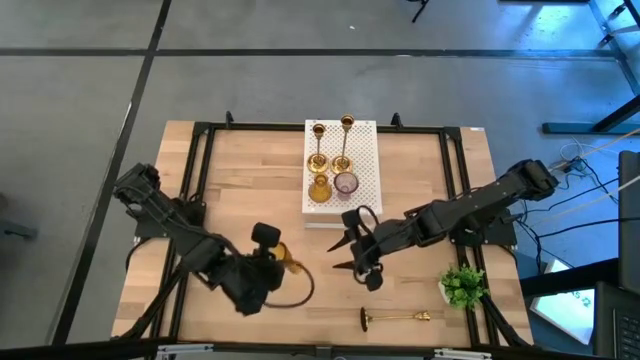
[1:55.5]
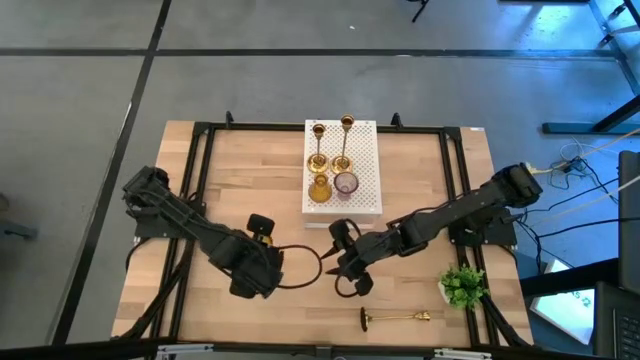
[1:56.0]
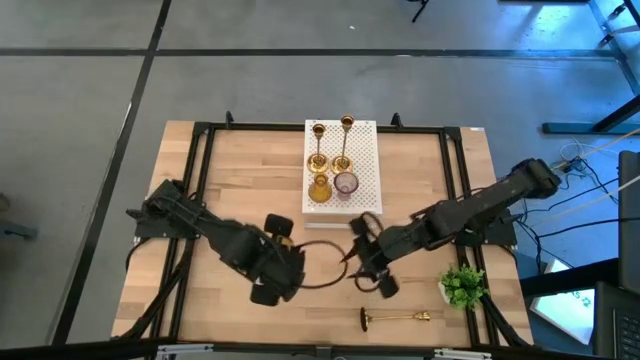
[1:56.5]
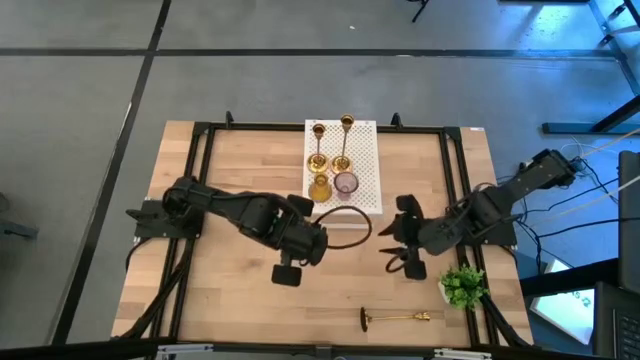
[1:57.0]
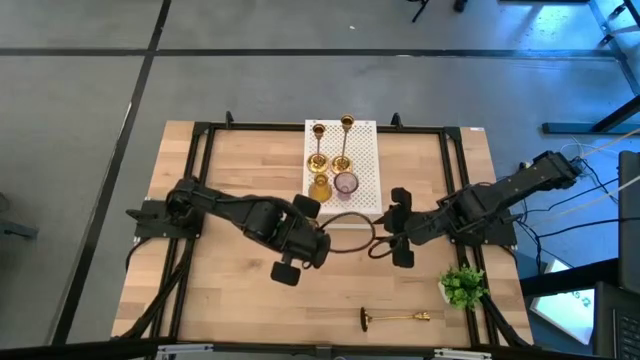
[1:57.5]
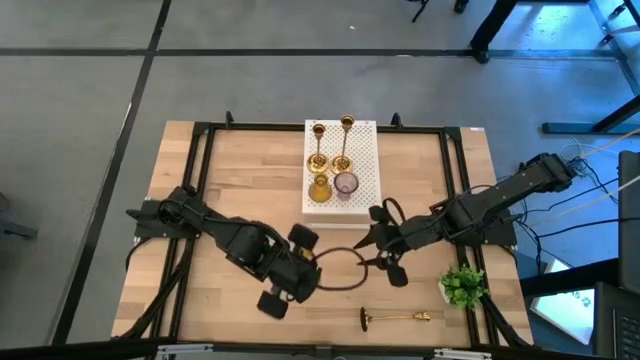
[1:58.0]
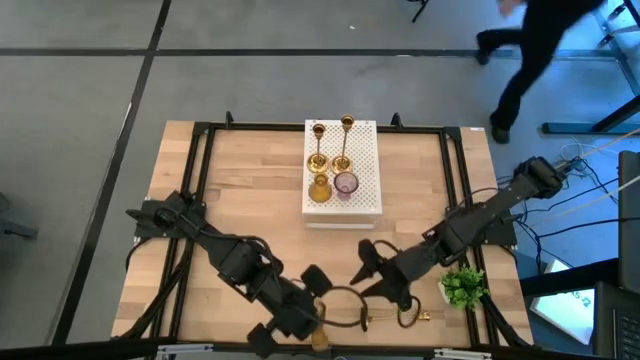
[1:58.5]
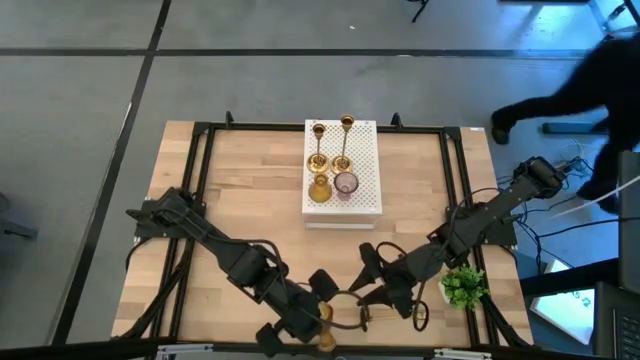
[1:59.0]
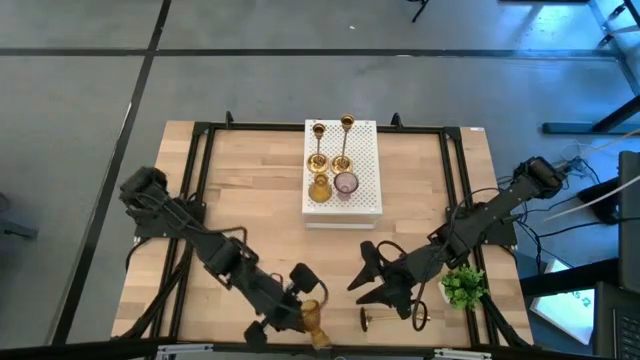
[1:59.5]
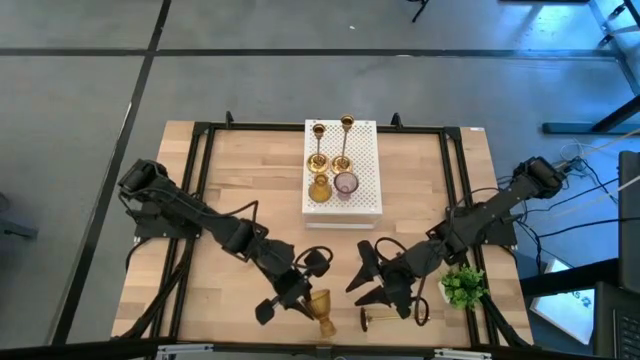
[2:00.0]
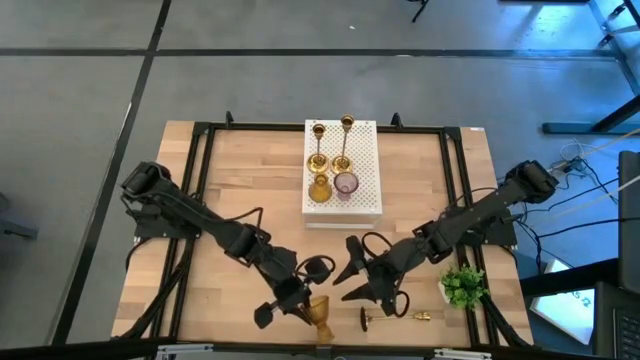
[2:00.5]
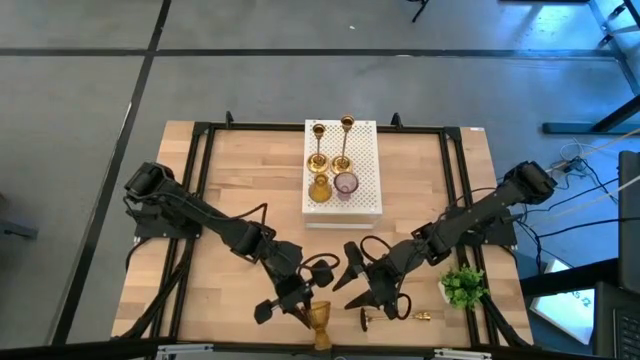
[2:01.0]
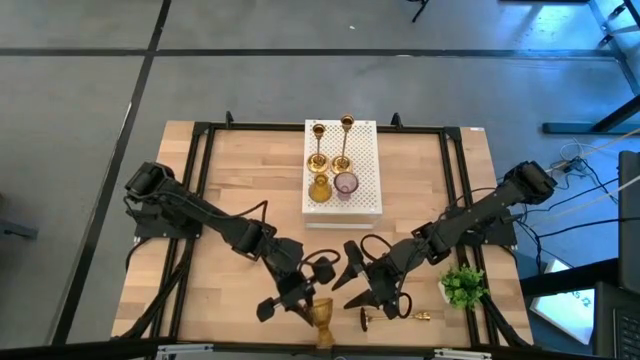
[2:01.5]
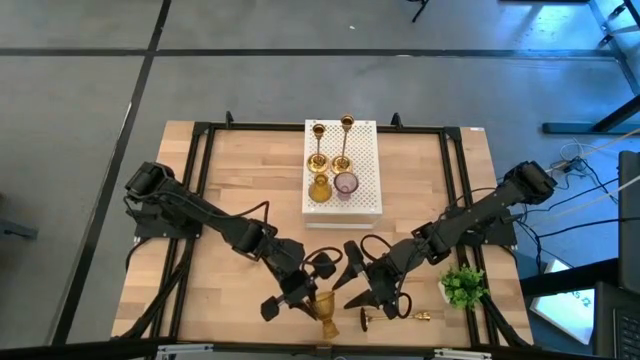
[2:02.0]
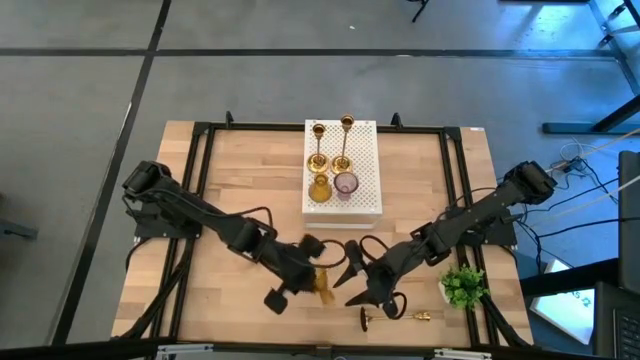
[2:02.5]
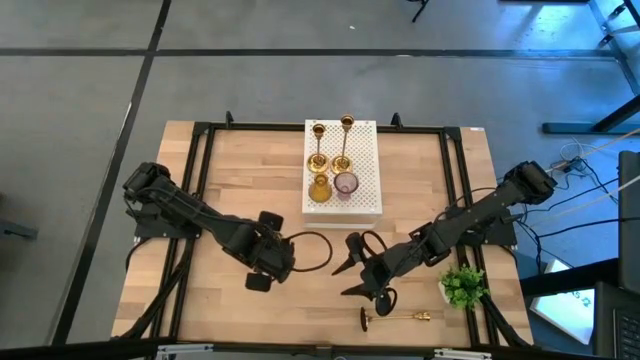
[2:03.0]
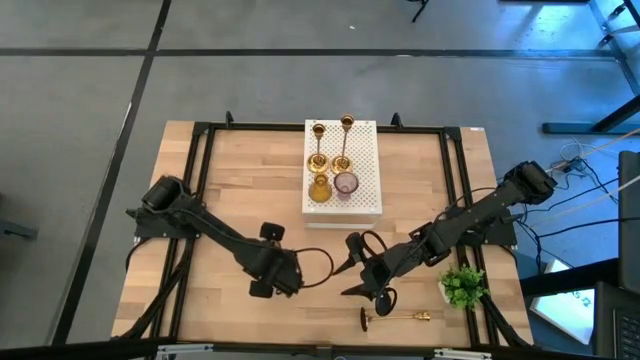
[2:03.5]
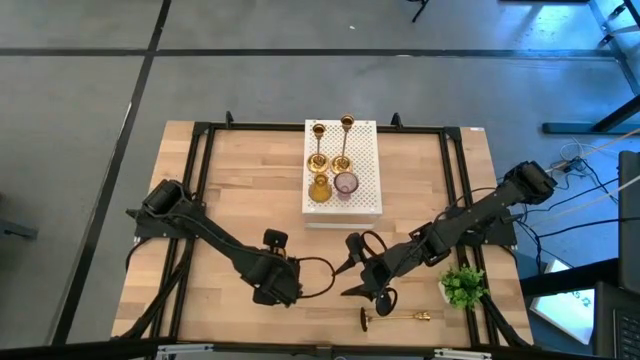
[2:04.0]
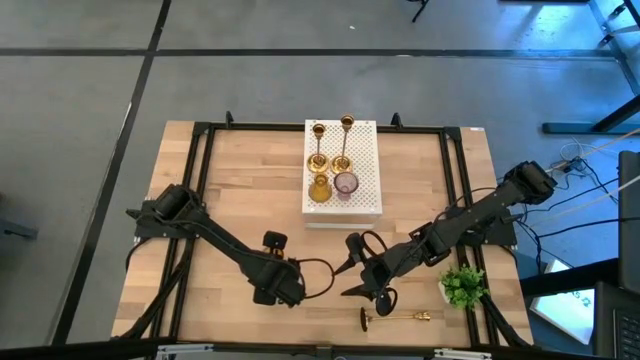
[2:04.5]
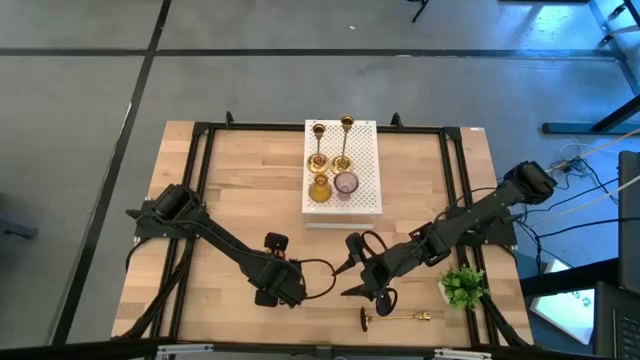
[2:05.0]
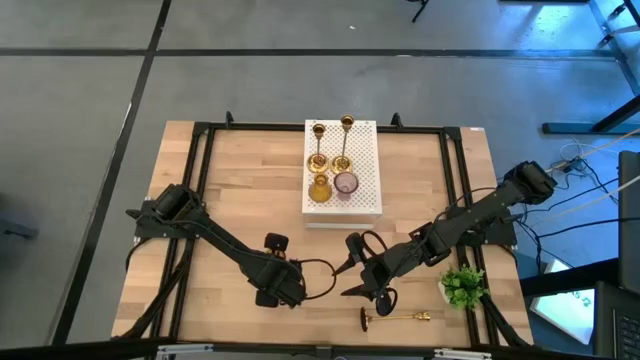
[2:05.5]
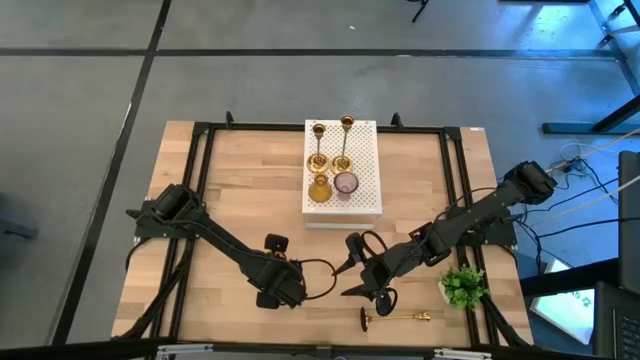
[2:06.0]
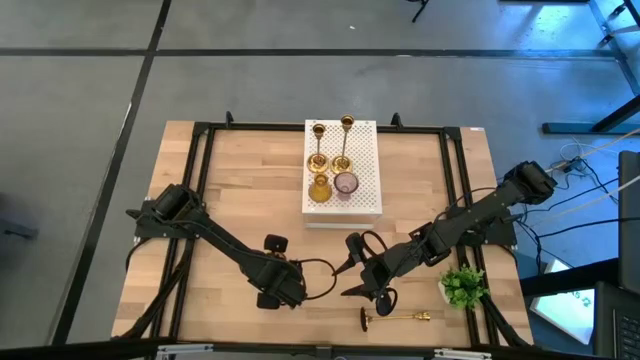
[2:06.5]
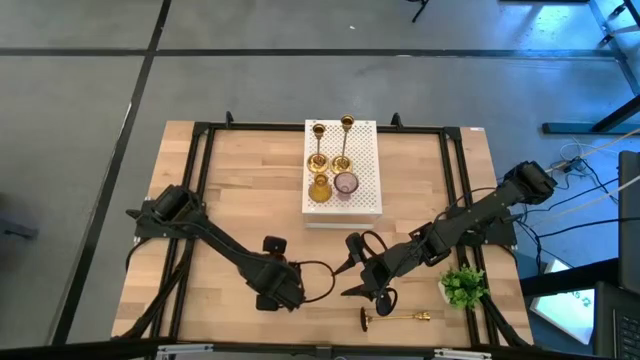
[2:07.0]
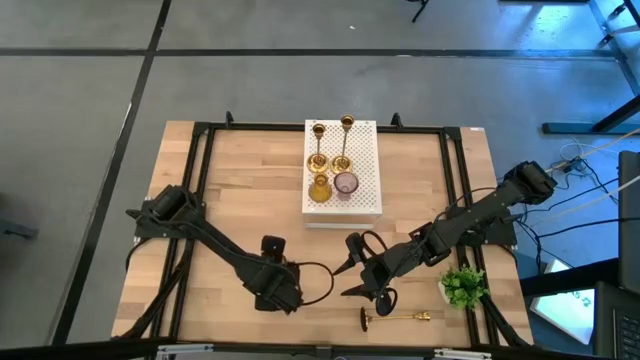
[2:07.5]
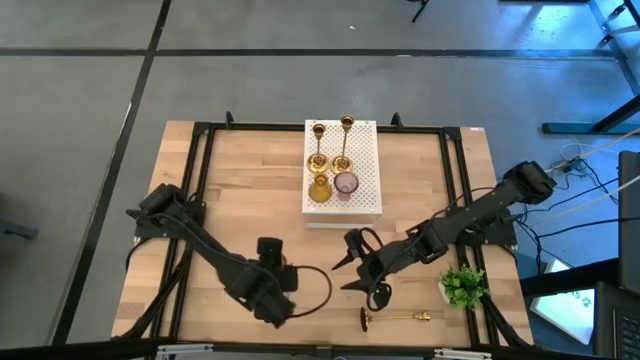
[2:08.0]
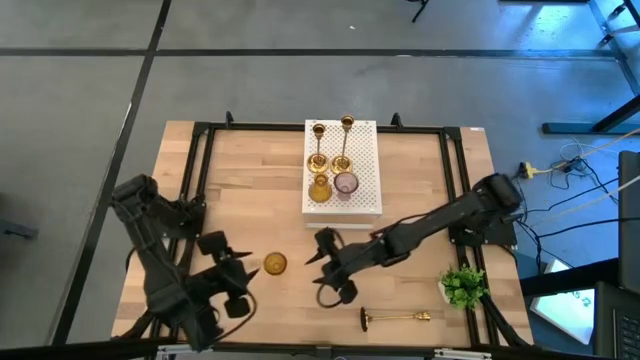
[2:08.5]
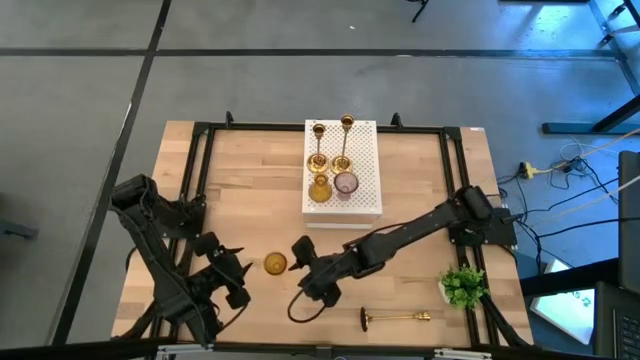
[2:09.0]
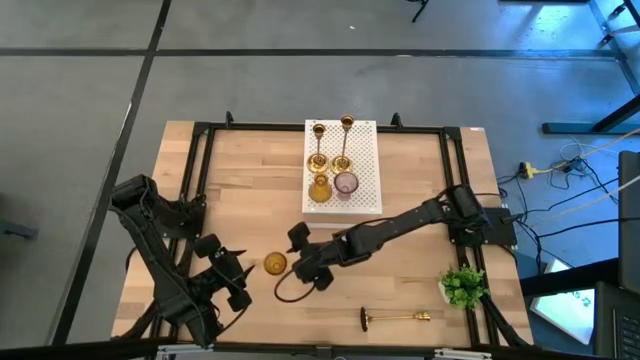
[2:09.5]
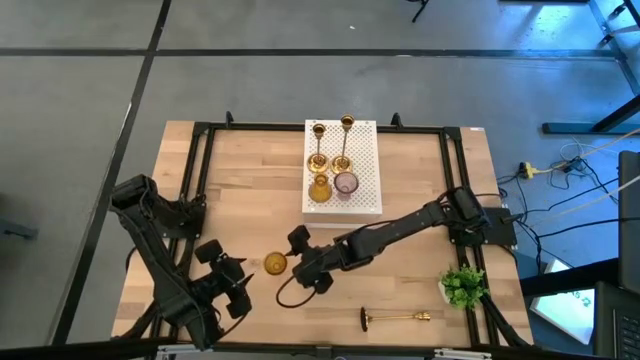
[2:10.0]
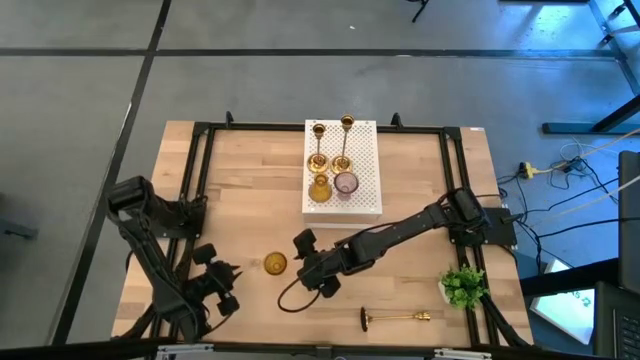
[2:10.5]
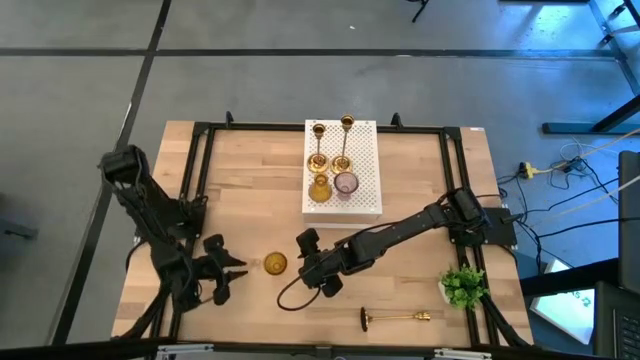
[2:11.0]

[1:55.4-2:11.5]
Task: Pick & Place candle stick holders
Put the yellow glass candlestick holder

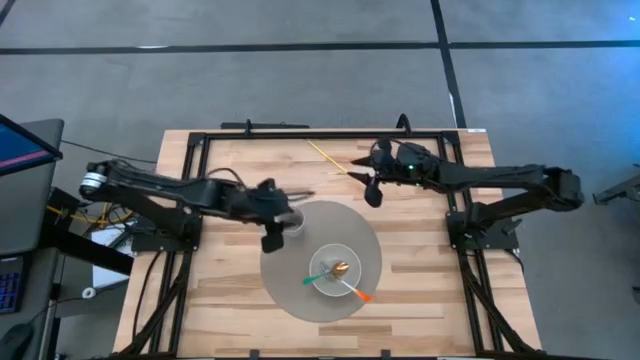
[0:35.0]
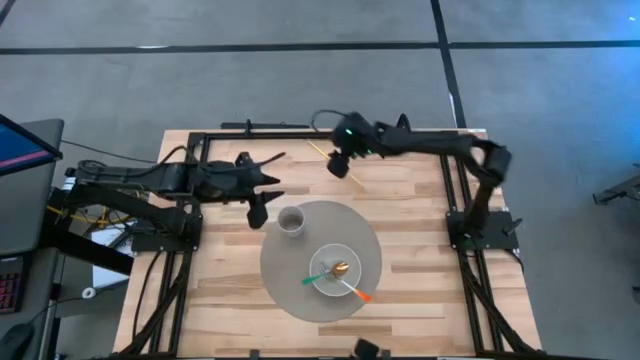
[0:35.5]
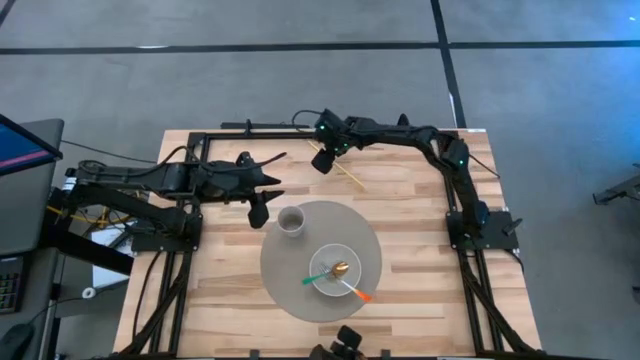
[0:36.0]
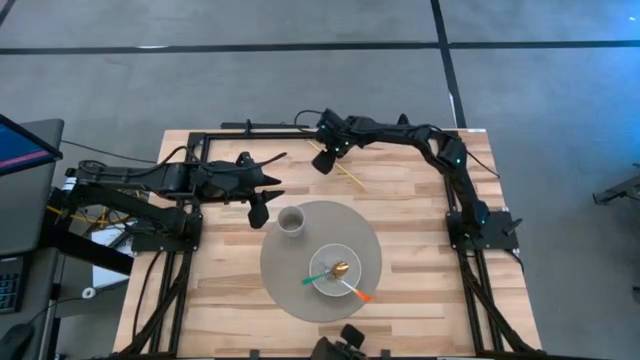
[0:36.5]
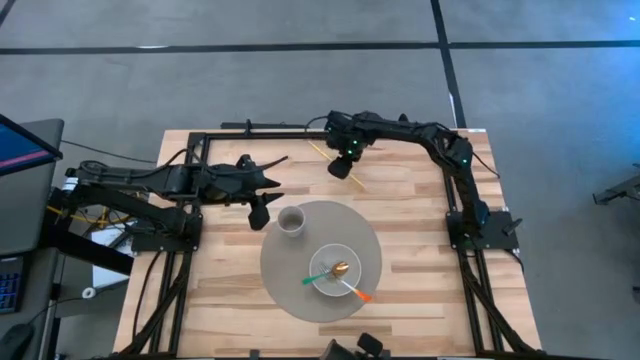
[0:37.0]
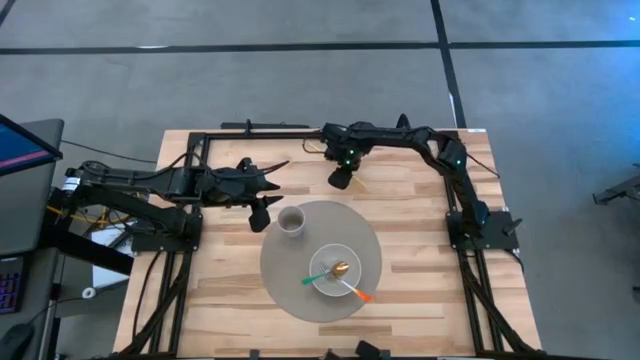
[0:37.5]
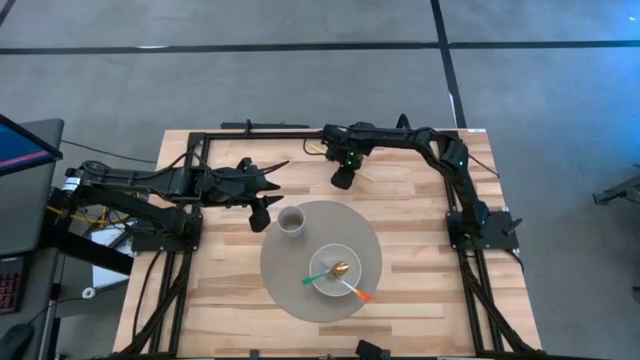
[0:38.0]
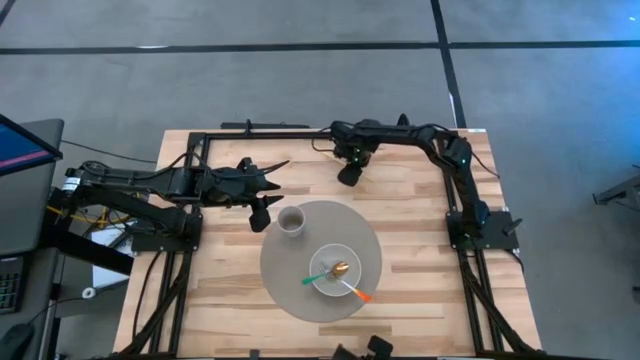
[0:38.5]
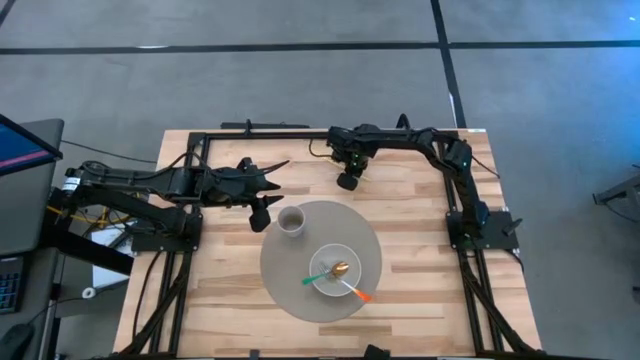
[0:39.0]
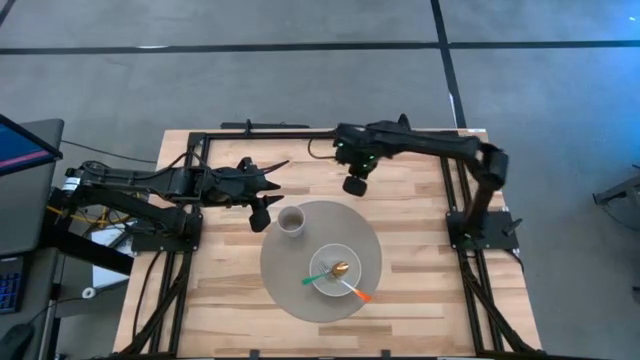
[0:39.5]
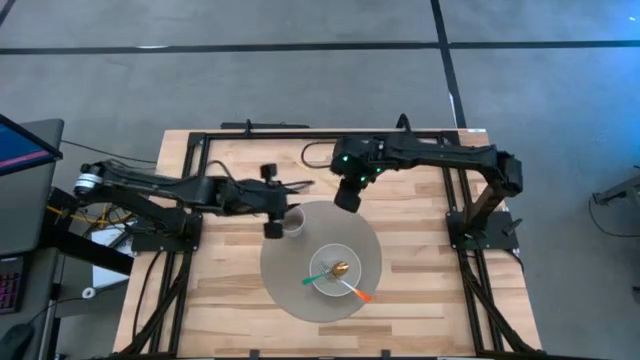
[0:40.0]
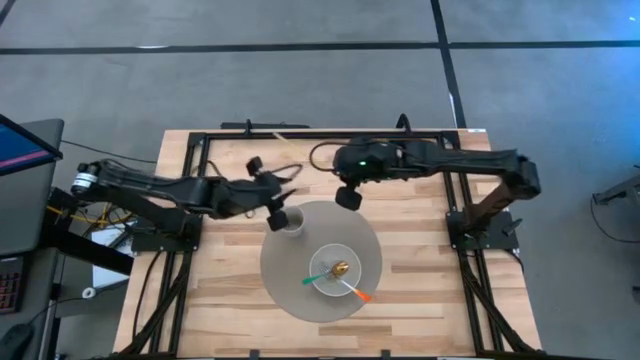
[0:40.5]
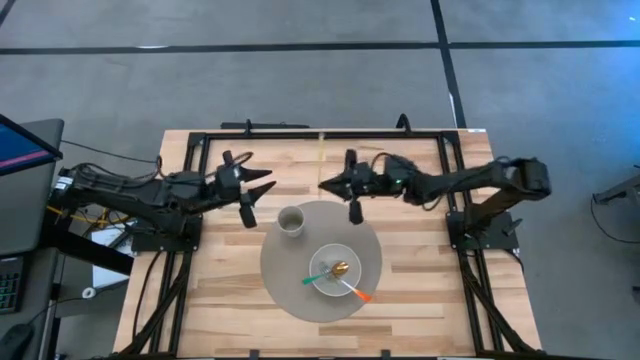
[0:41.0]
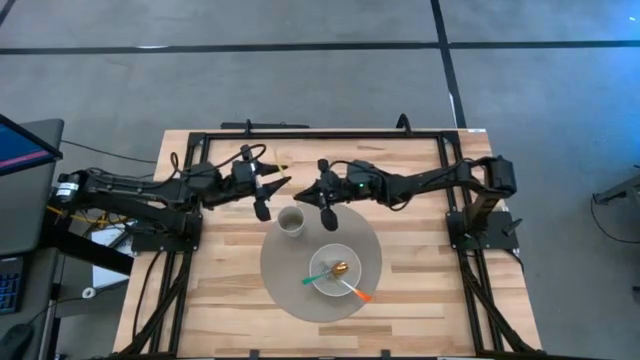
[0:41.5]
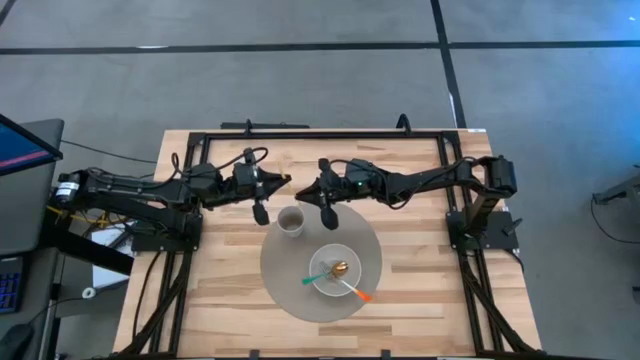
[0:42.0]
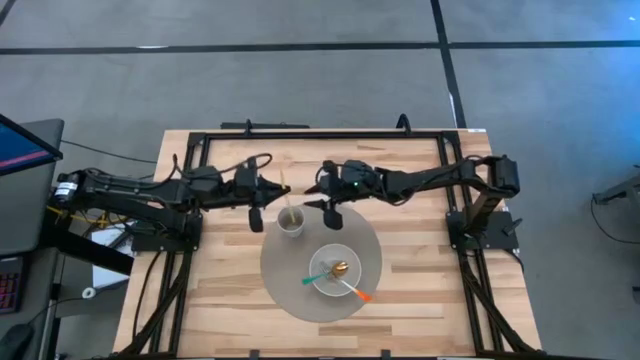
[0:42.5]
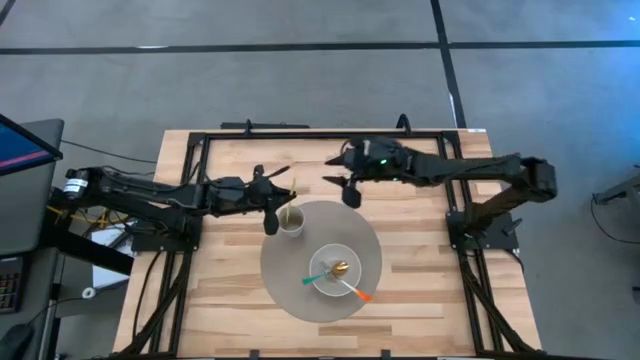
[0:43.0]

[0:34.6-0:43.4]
Task: Pick & Place Utensil
Put the yellow straw into the gray cup
